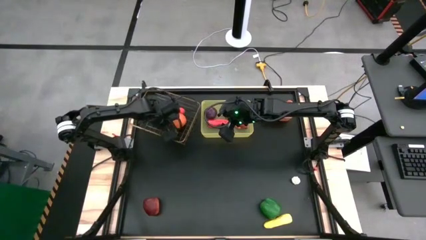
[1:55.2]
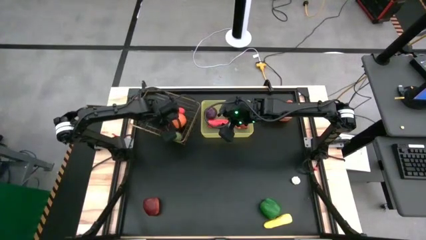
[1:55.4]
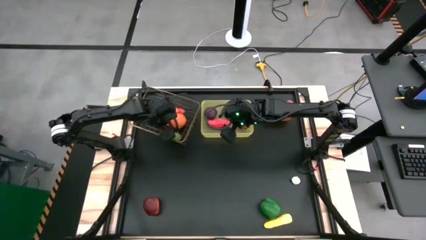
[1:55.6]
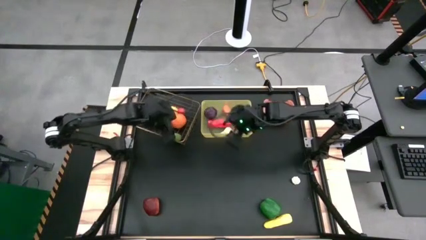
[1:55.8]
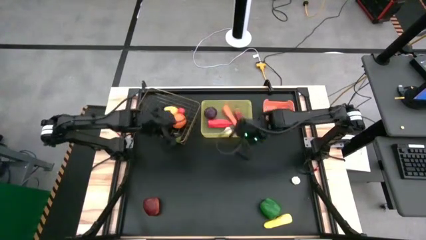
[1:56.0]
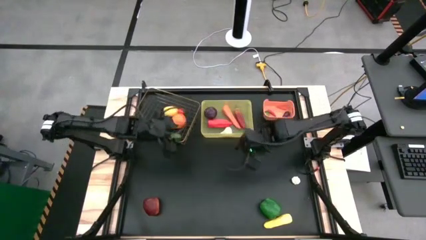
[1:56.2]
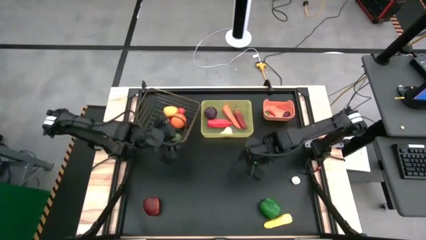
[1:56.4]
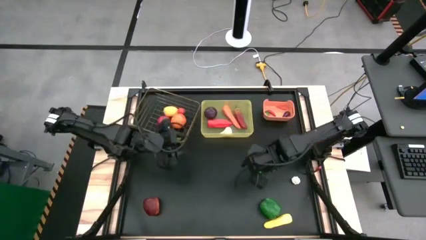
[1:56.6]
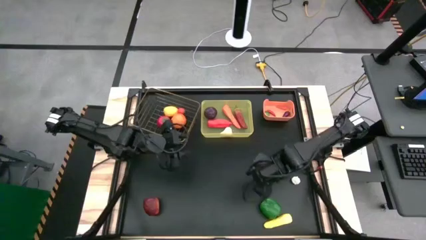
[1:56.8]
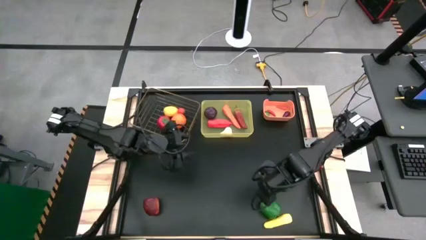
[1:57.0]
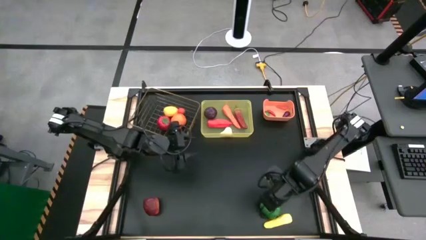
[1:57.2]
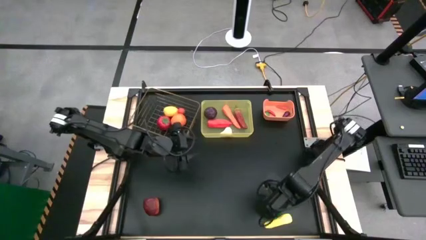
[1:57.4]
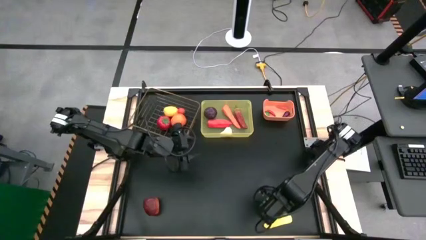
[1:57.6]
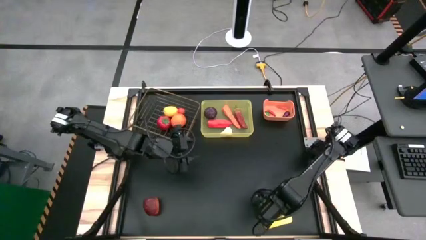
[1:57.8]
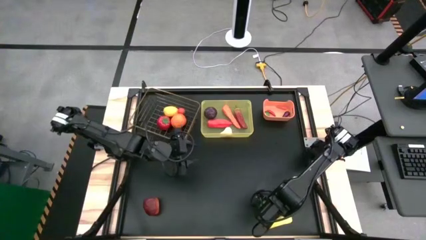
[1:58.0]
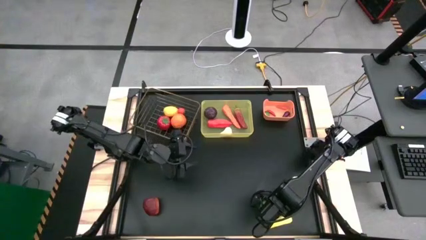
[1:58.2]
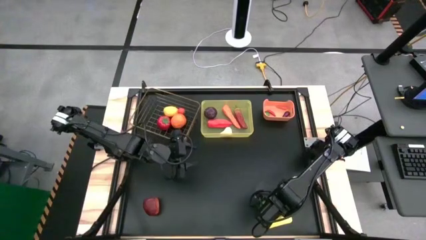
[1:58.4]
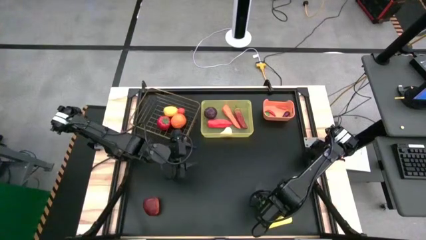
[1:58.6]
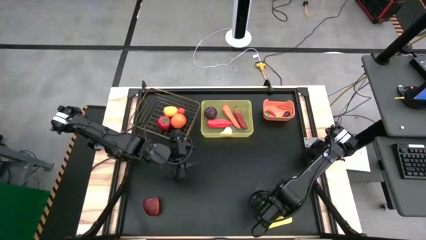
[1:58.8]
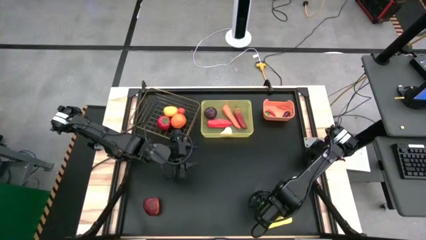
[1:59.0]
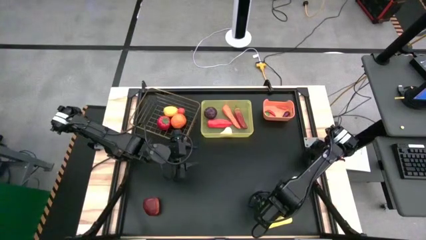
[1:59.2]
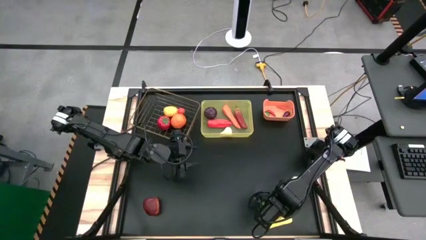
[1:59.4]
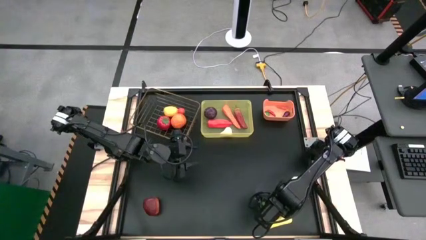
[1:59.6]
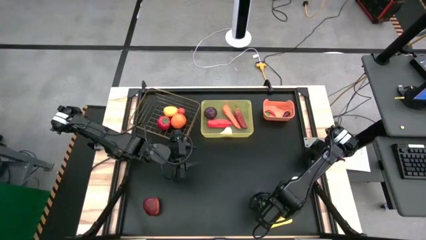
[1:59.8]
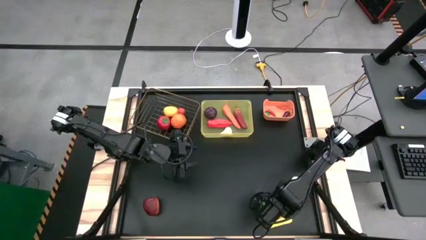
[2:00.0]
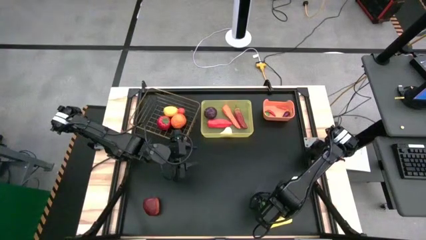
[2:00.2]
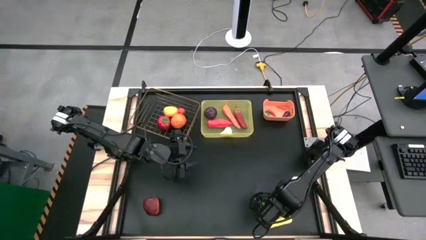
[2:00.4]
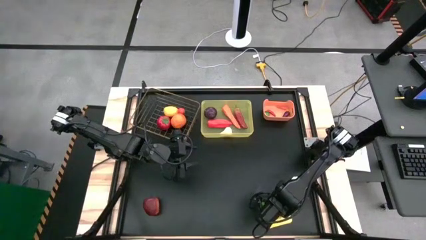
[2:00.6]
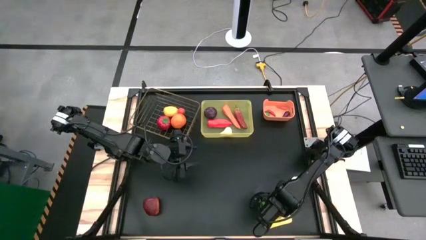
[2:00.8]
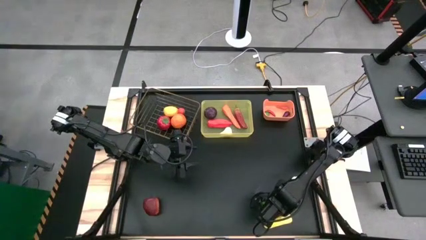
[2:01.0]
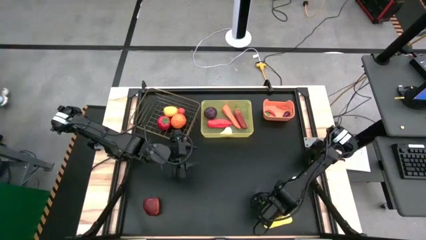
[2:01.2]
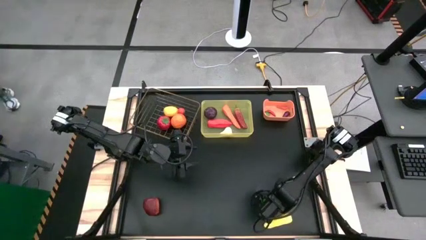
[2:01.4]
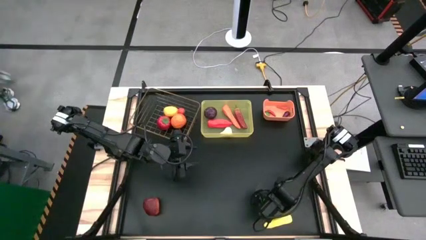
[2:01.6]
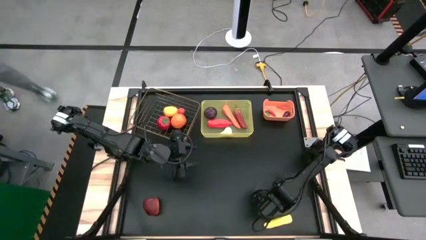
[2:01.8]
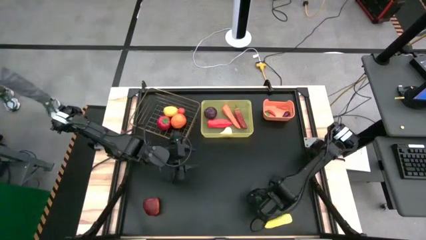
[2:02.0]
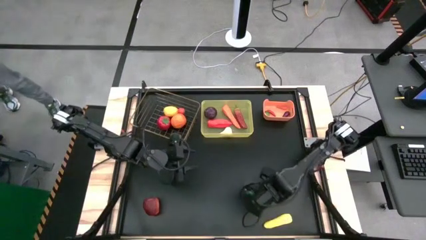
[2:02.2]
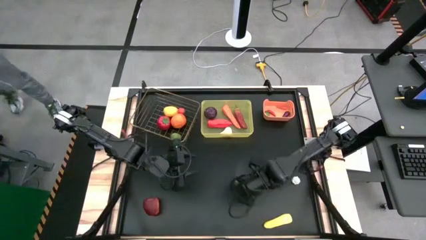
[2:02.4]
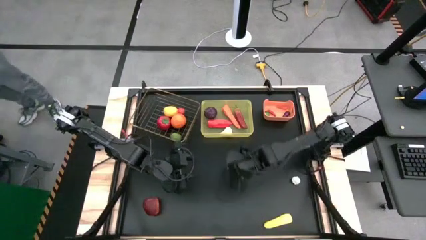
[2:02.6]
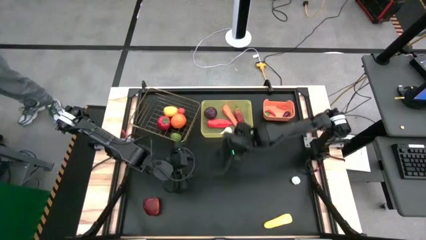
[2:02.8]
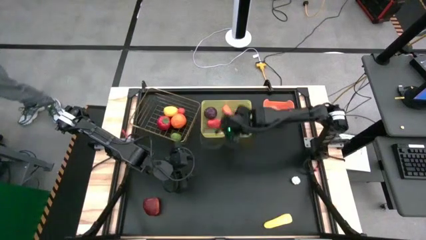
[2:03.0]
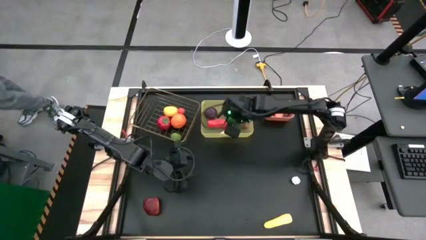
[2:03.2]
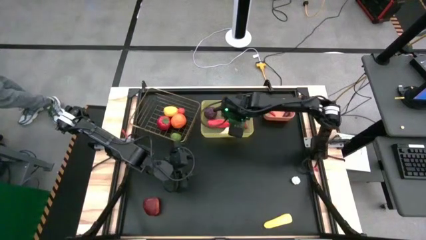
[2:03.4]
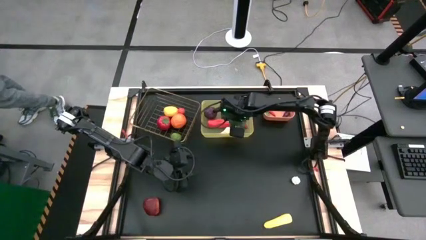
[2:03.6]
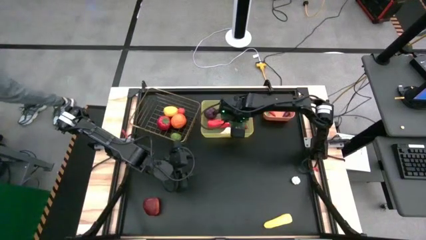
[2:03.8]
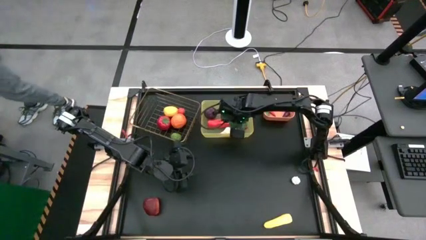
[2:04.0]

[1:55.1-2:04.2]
Task: Sort produce into baskets
Put the bell pepper into the yellow bin

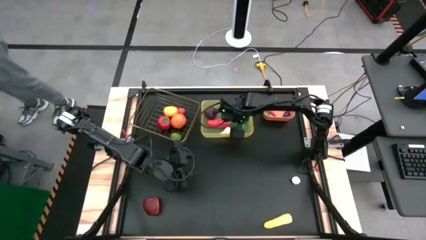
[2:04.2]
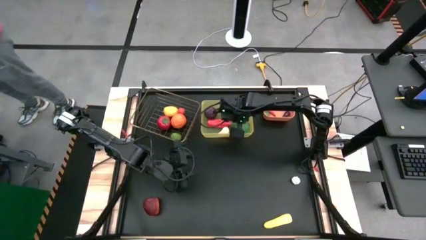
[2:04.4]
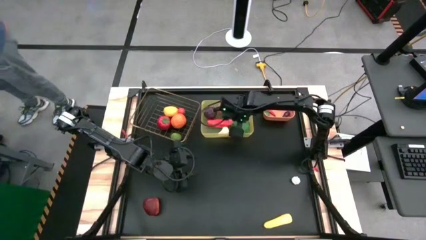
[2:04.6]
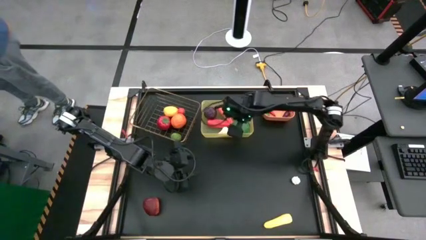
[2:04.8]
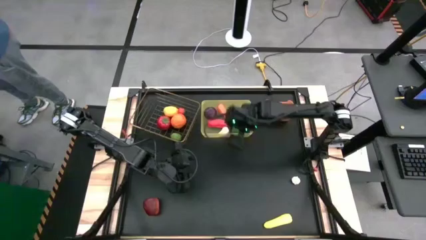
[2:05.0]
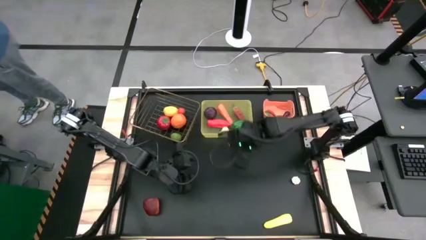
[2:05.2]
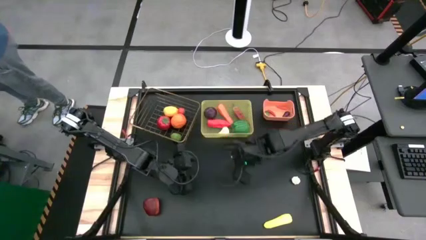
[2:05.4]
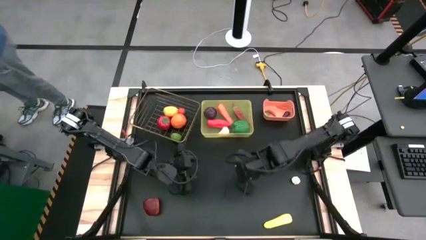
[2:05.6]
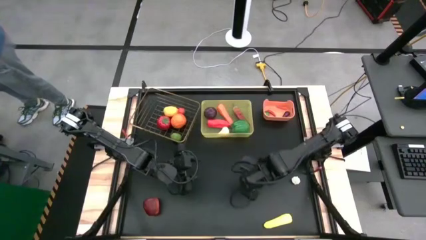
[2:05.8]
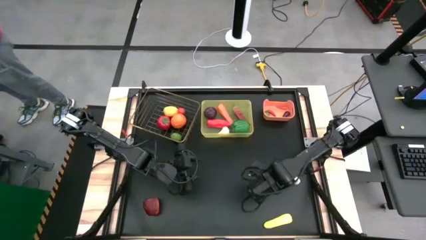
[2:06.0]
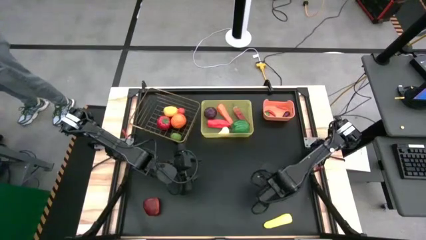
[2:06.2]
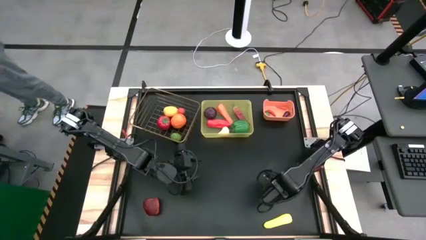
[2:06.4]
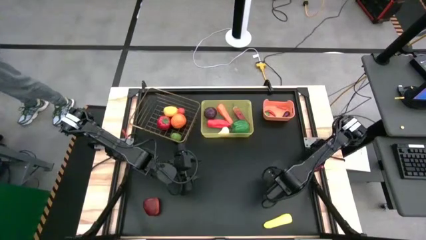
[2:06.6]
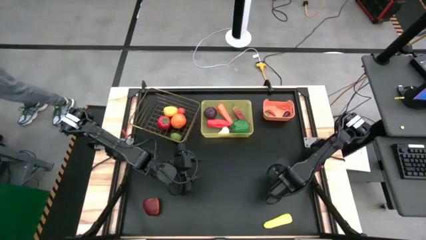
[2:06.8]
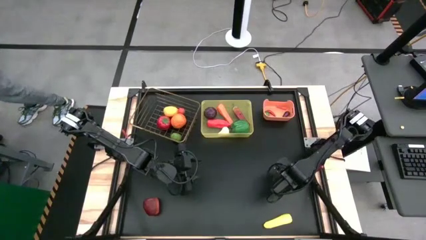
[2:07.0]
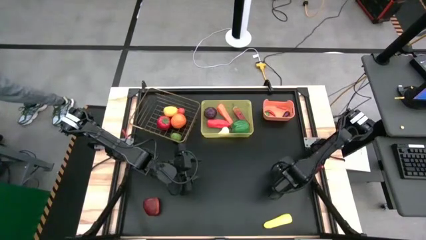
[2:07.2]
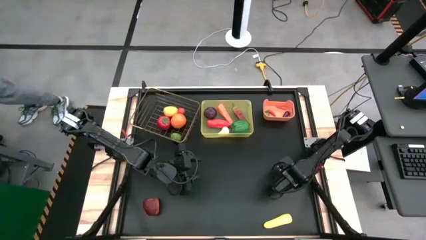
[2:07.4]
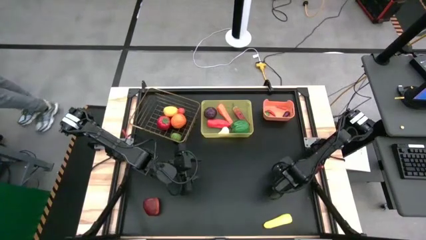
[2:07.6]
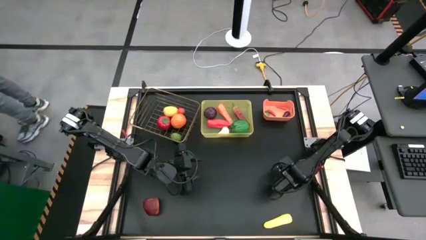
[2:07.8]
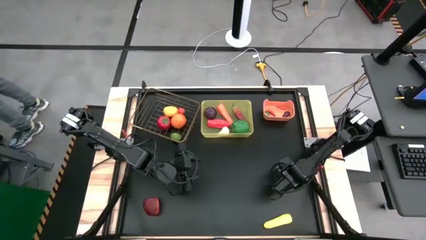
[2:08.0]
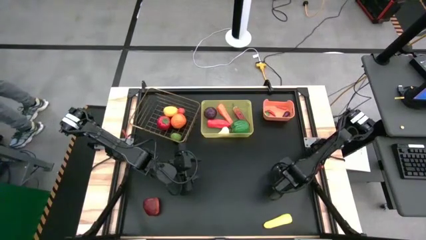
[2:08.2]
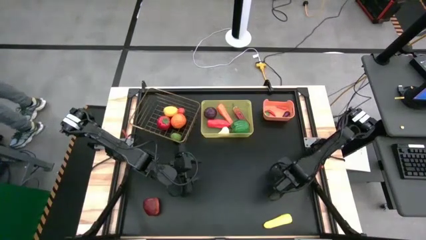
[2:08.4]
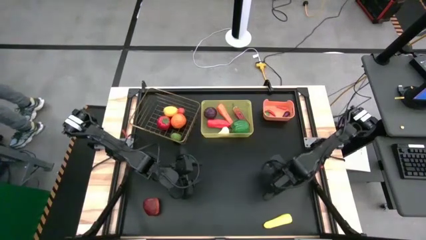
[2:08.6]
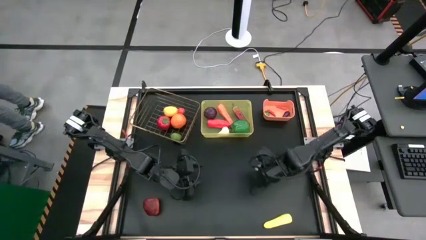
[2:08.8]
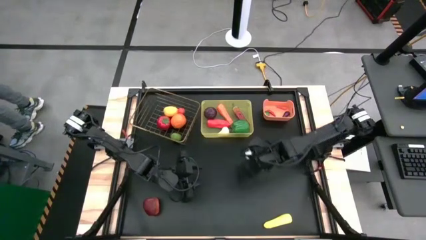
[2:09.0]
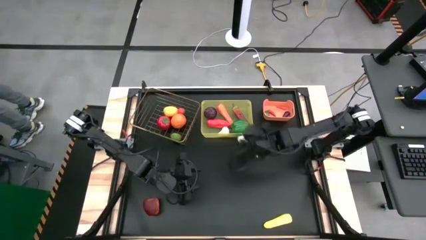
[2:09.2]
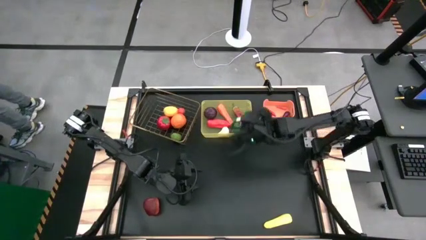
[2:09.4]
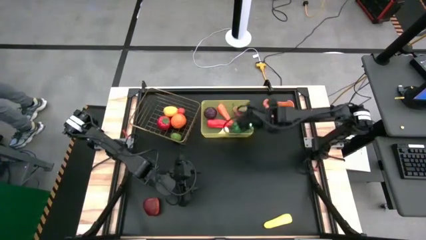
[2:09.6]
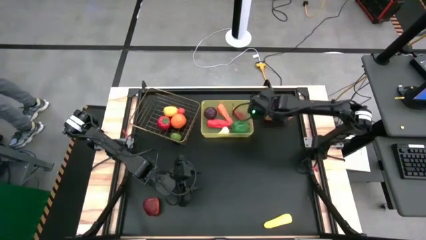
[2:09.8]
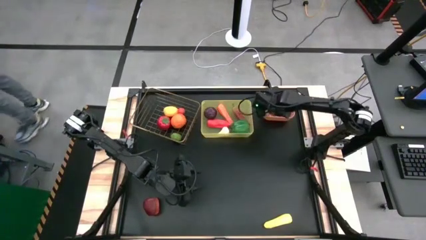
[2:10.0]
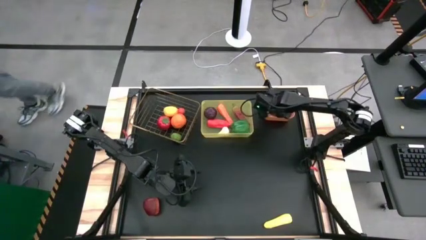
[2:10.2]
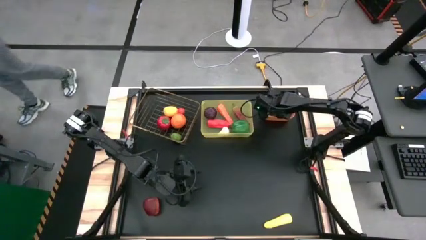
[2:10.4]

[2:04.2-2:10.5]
Put the garlic into the orange bin
